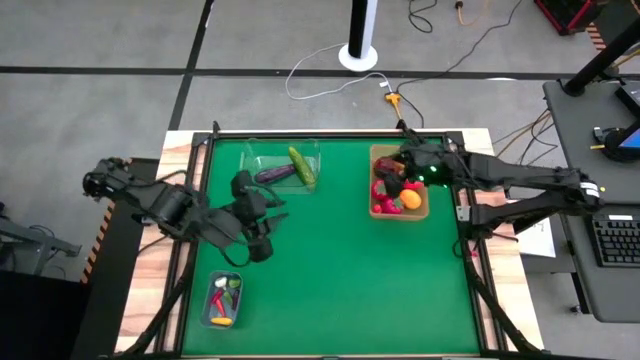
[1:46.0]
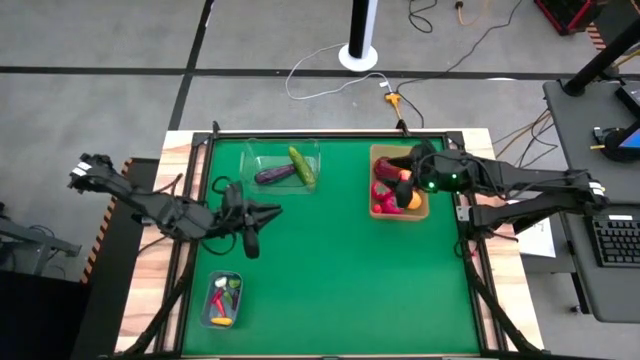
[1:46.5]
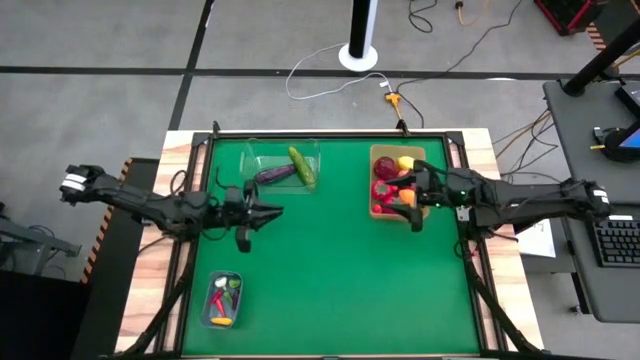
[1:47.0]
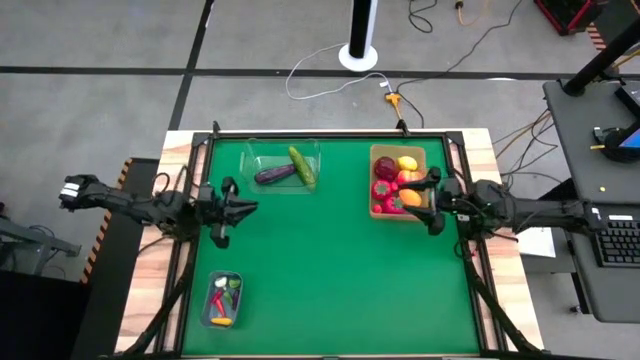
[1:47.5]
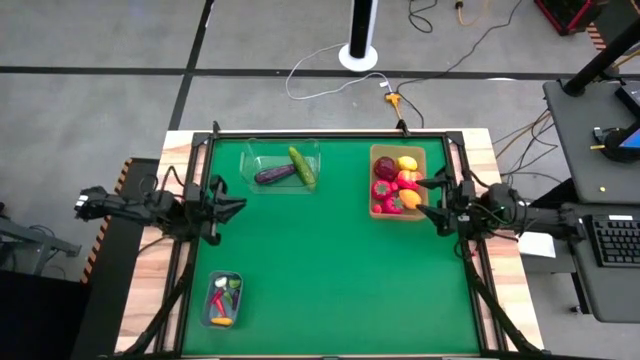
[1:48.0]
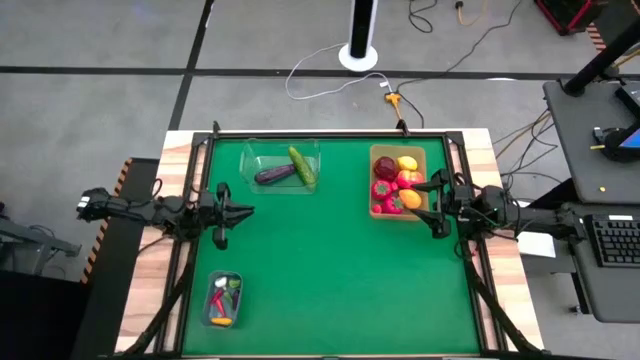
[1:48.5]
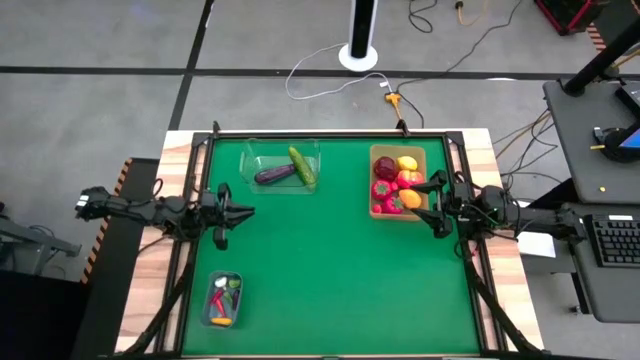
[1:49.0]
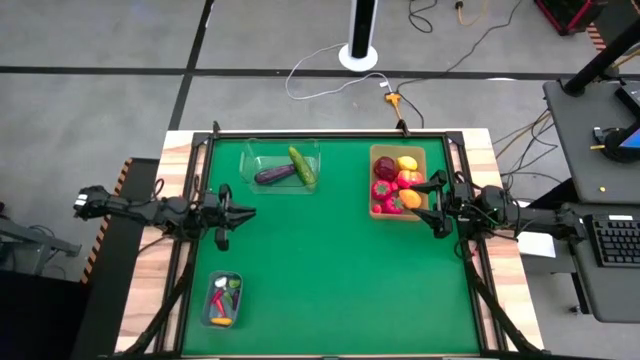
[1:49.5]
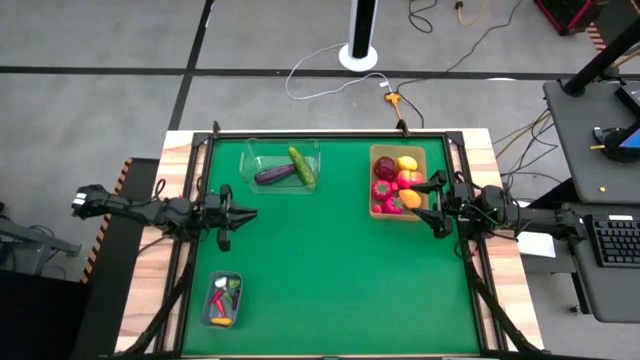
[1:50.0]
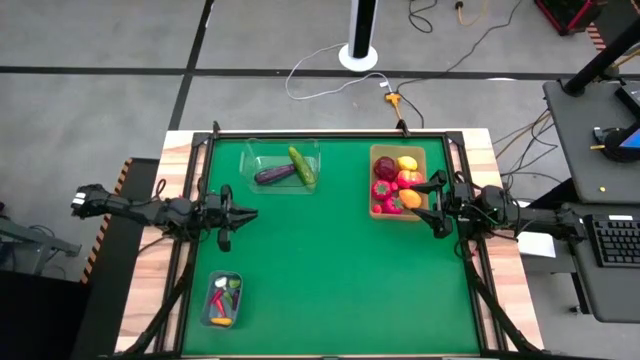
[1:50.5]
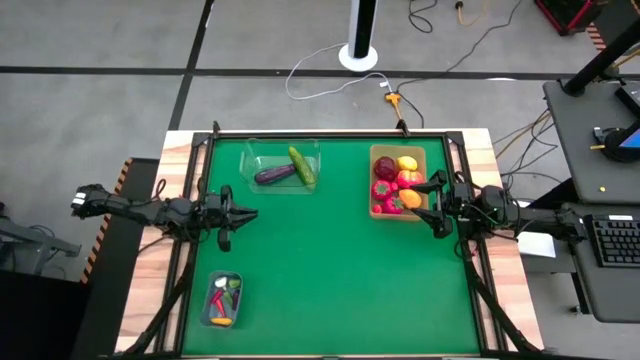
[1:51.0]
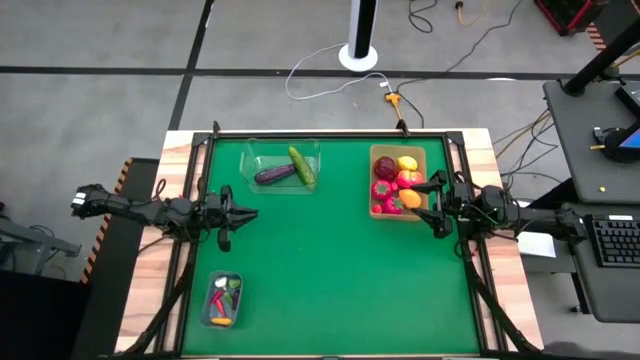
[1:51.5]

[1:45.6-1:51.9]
Task: Sort produce into baskets
Return to Home Position

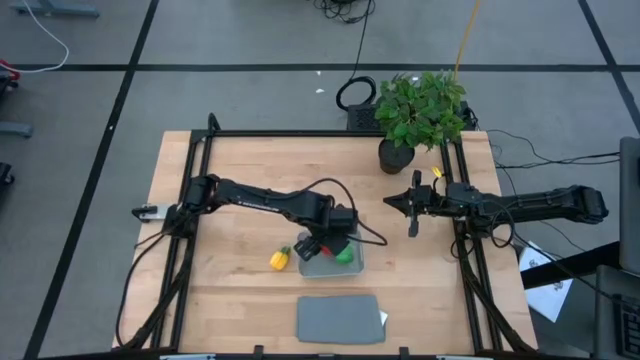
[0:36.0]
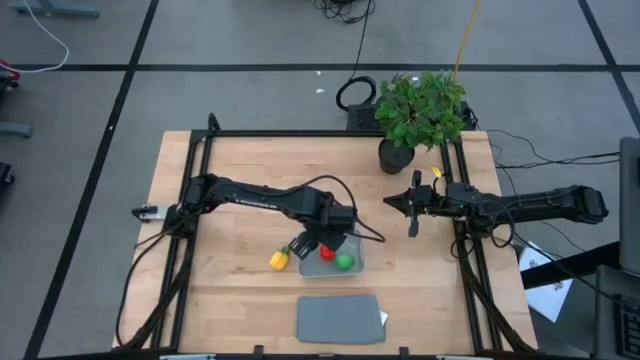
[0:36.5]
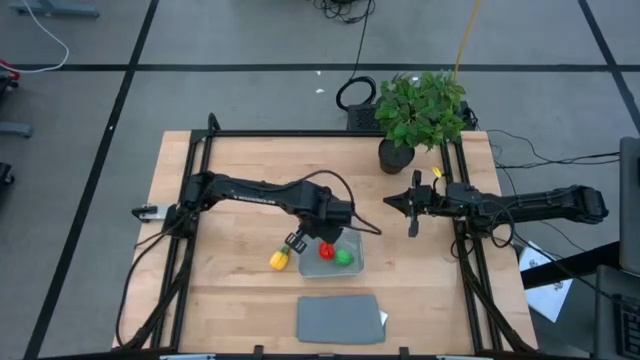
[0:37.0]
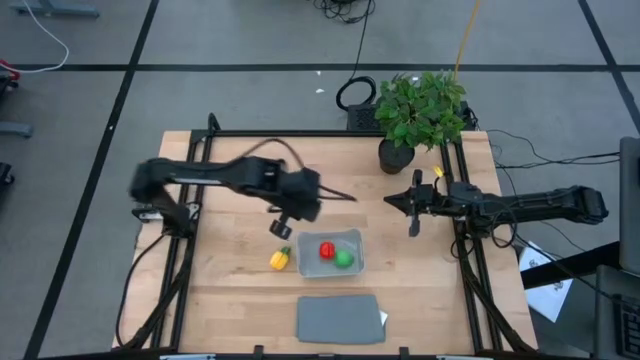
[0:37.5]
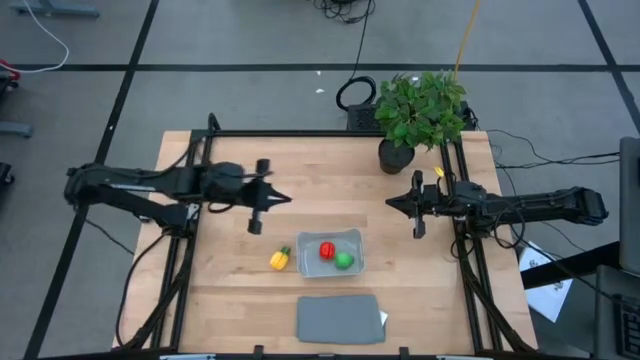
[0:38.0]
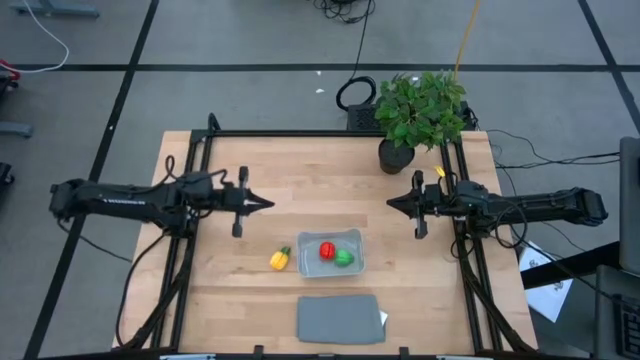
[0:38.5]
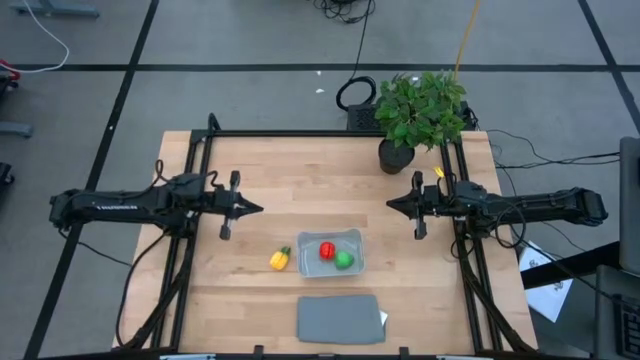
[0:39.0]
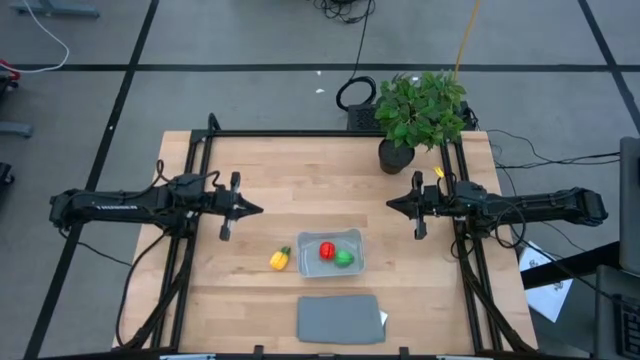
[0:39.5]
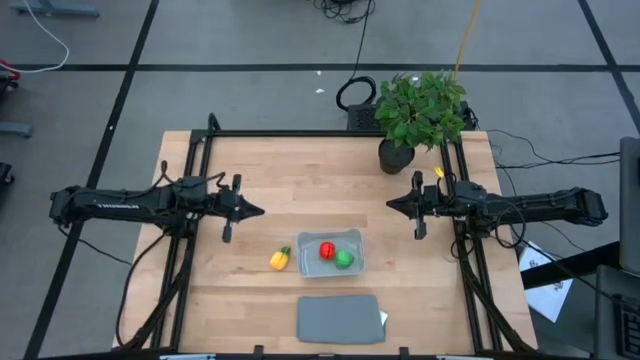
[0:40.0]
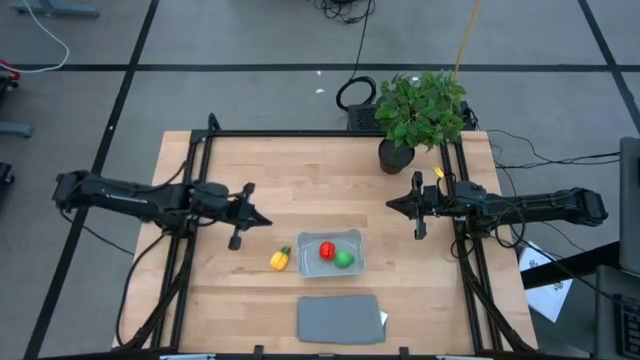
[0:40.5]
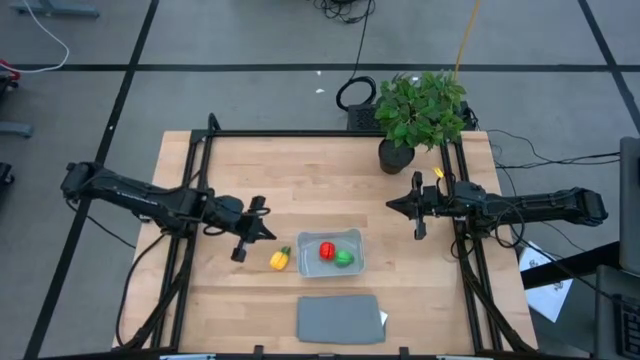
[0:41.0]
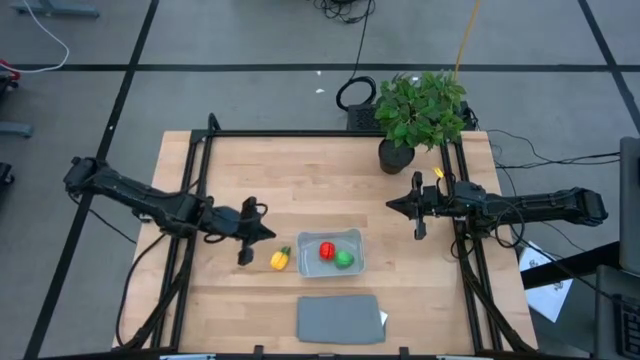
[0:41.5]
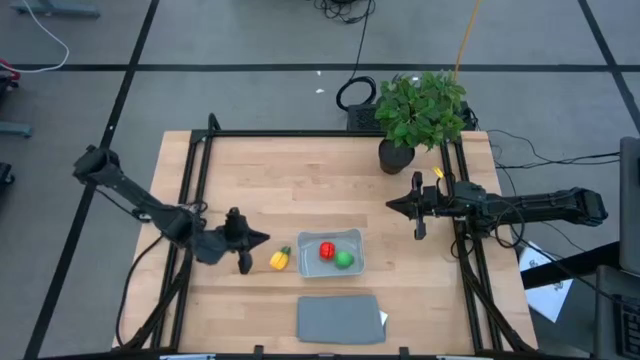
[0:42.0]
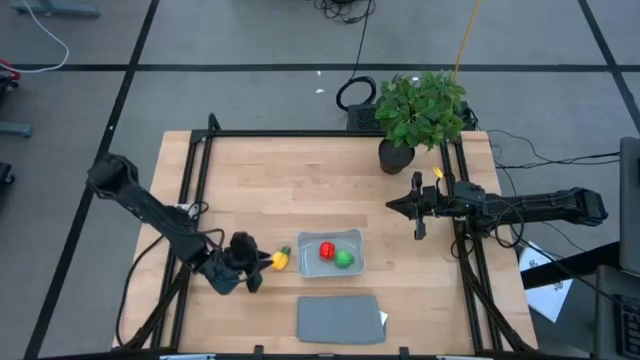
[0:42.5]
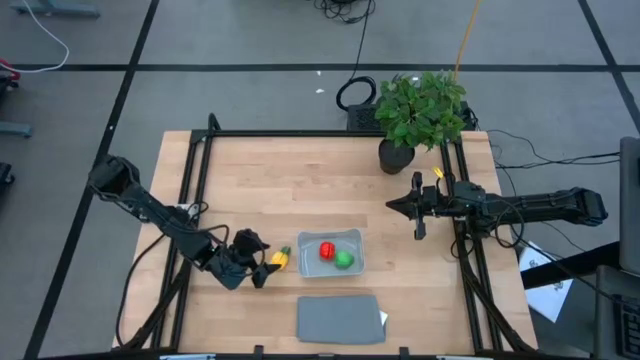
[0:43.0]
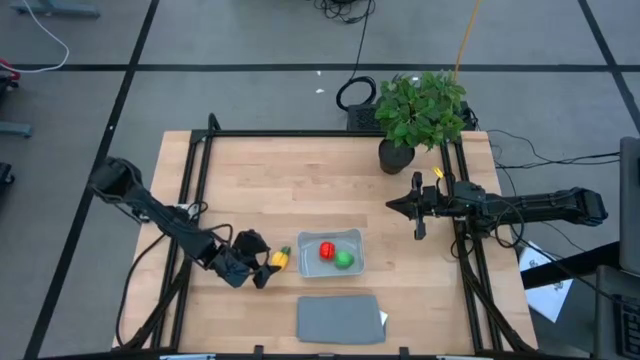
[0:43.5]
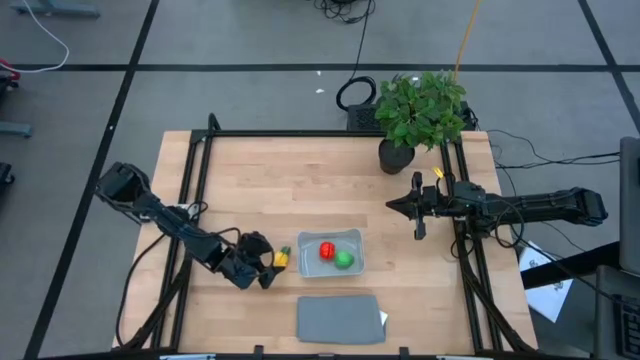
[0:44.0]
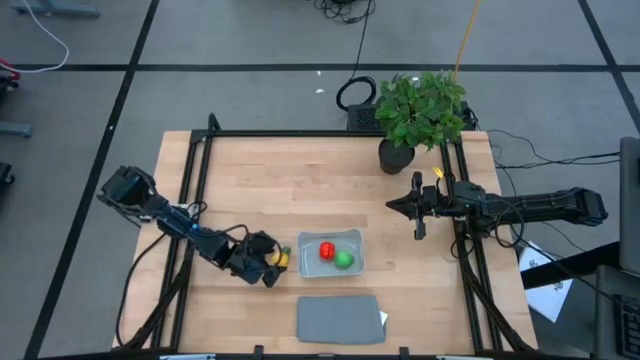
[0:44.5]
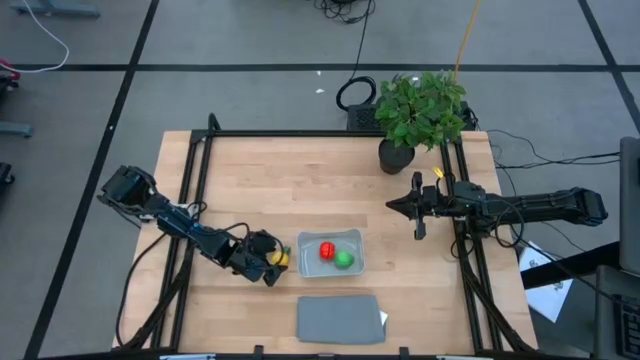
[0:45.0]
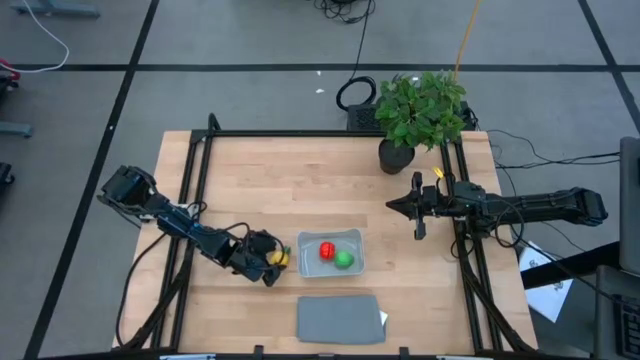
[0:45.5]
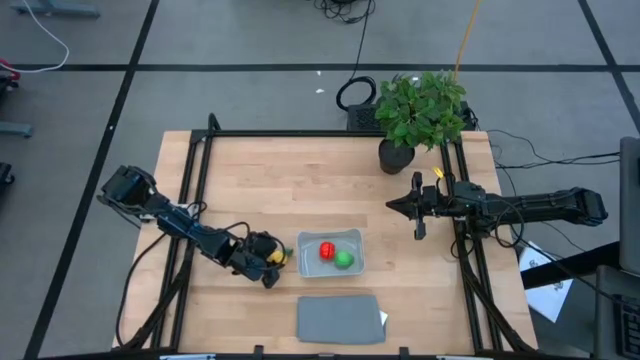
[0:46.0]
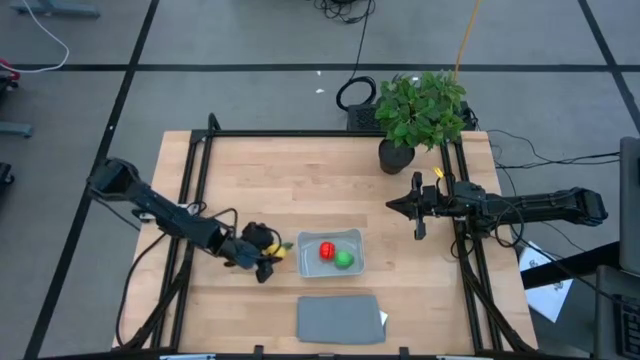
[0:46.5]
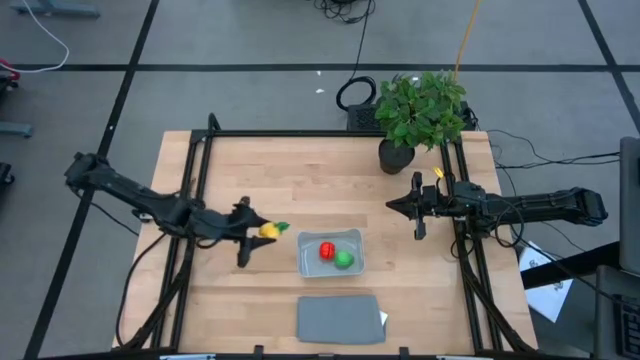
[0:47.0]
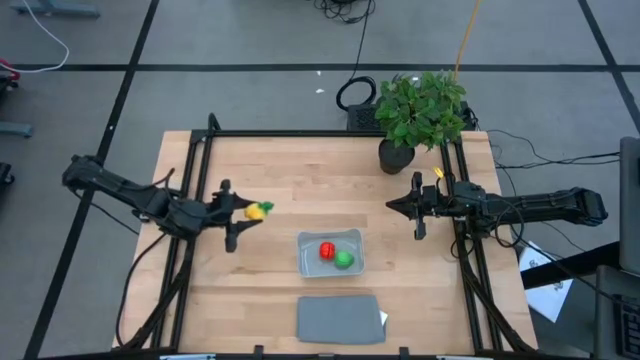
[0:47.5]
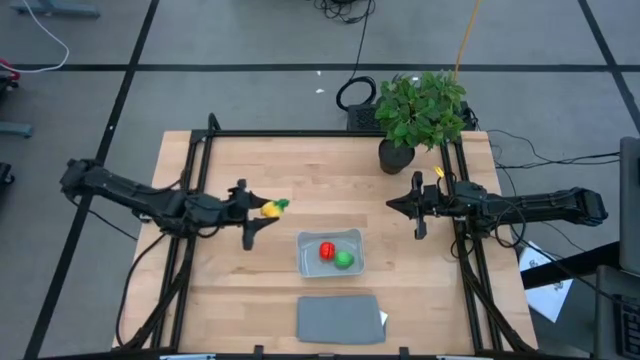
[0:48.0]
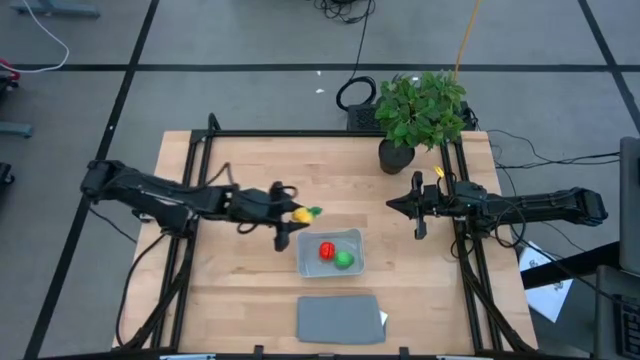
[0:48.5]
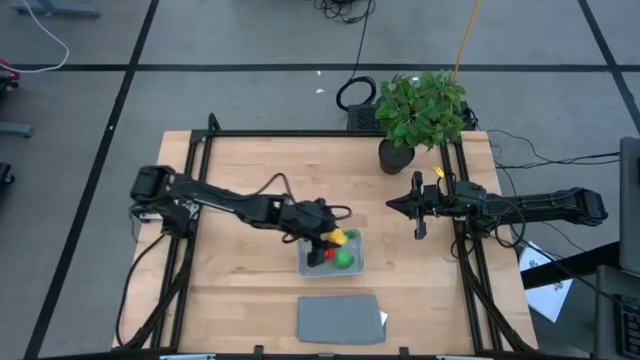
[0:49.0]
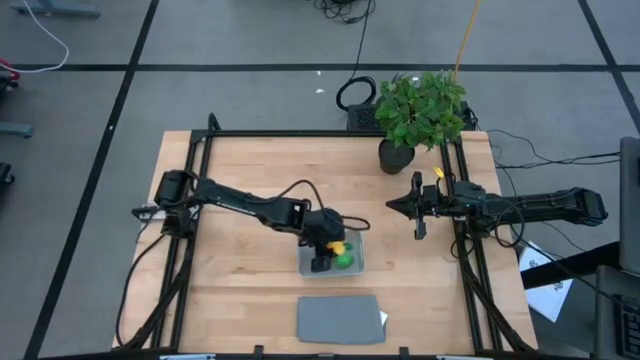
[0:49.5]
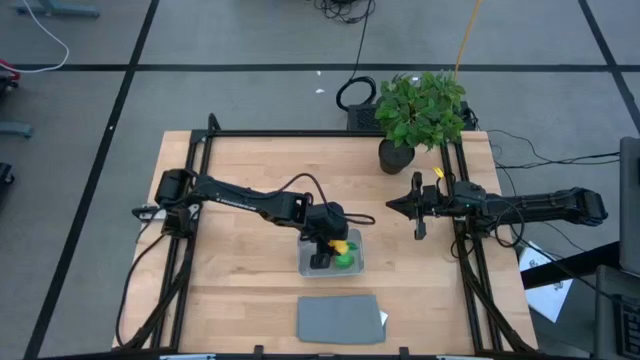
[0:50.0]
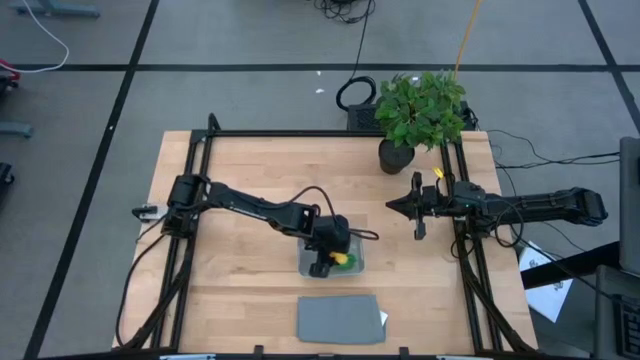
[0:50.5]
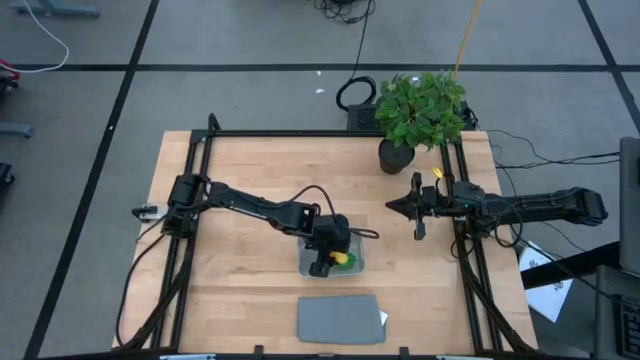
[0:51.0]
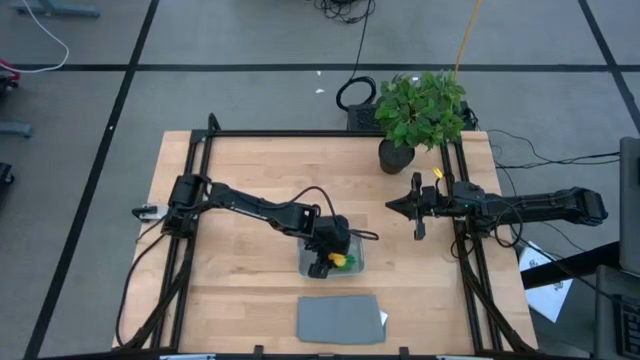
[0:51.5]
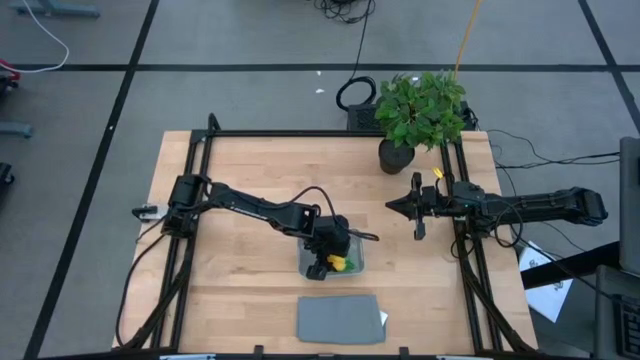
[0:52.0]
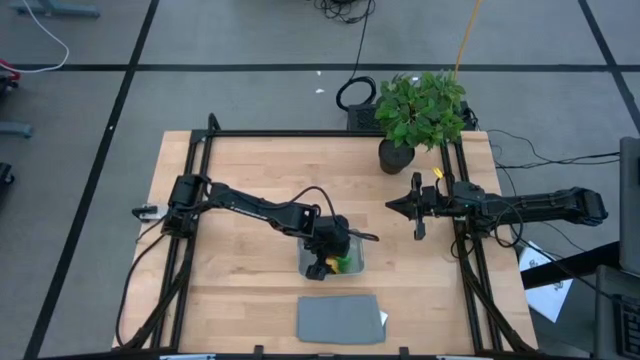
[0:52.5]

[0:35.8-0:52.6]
Task: Pick and placing Produce into tupperware
Put the pineapple into the bin
